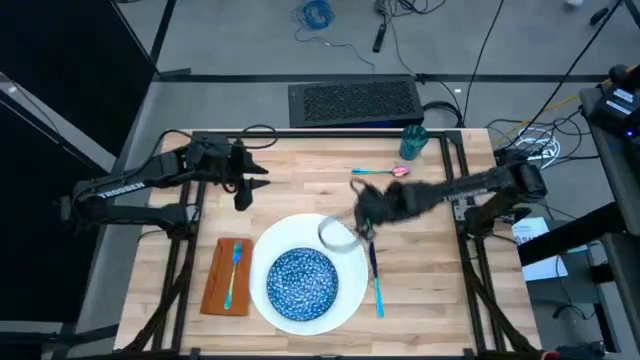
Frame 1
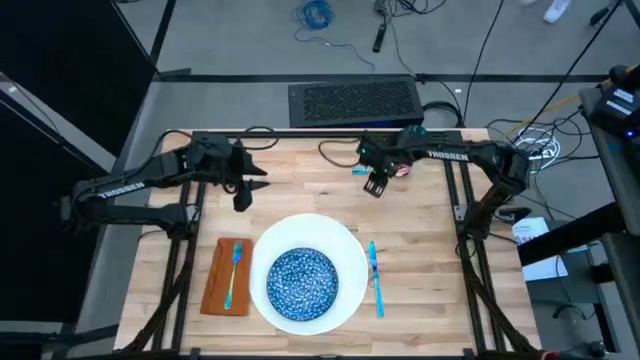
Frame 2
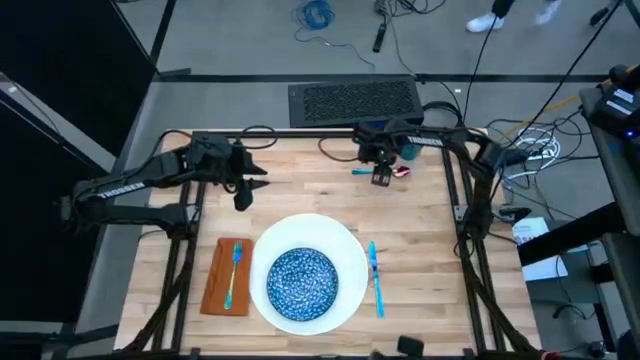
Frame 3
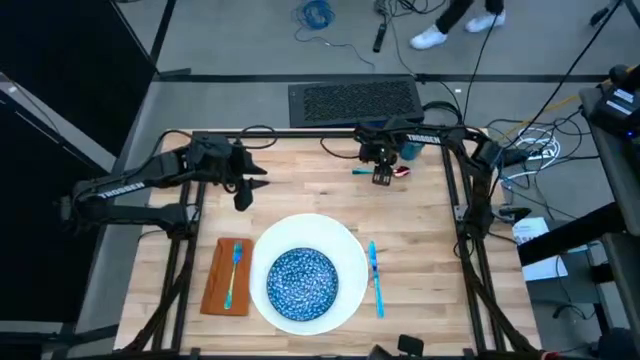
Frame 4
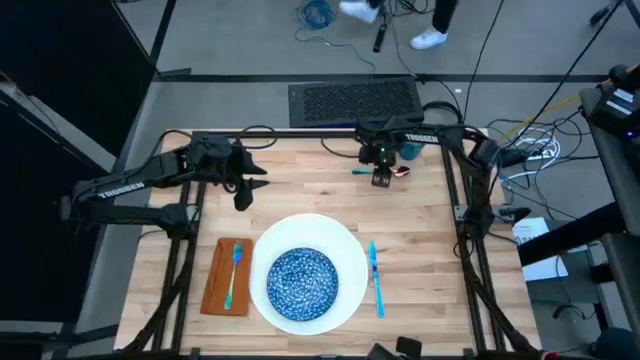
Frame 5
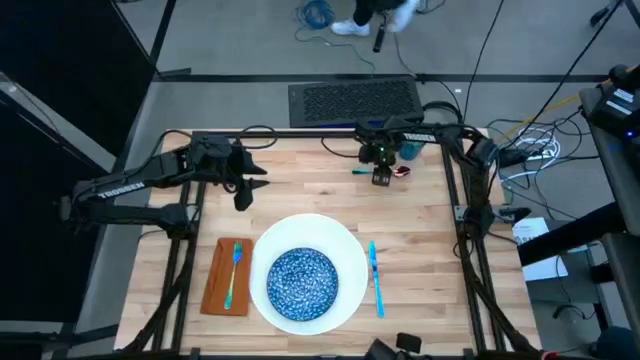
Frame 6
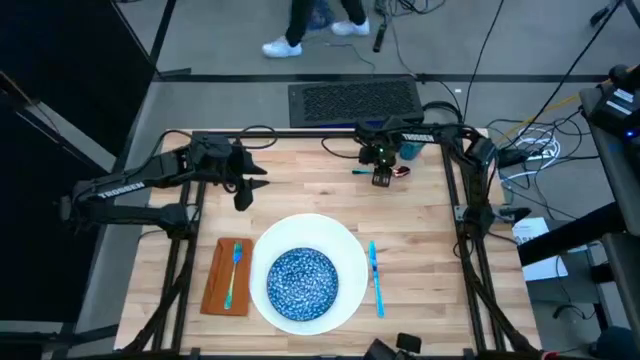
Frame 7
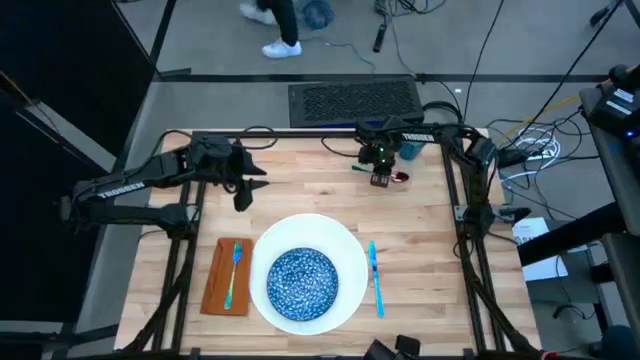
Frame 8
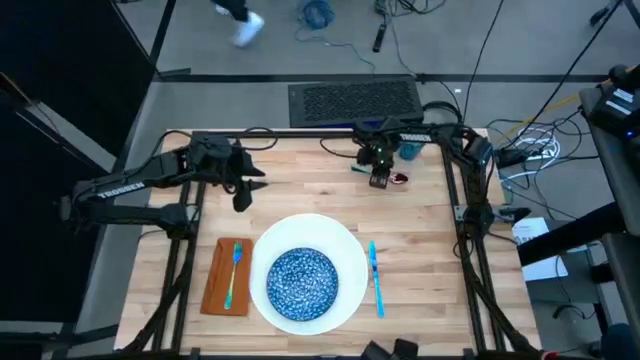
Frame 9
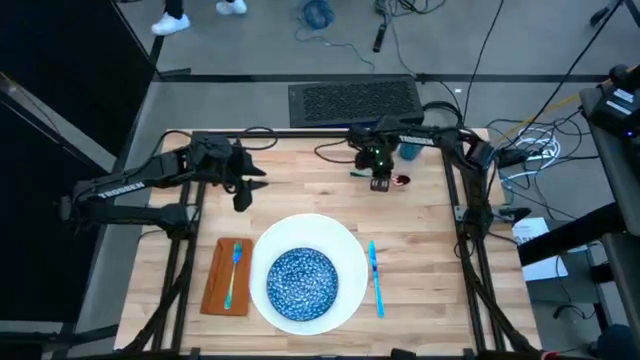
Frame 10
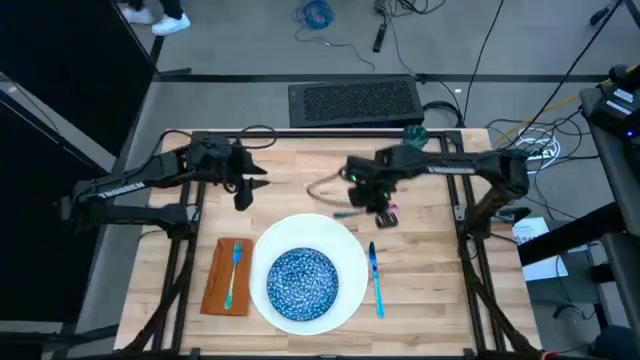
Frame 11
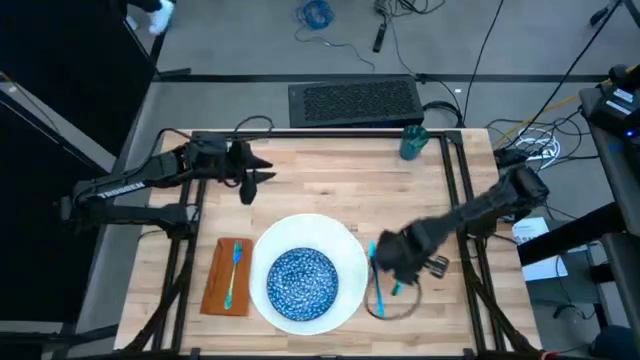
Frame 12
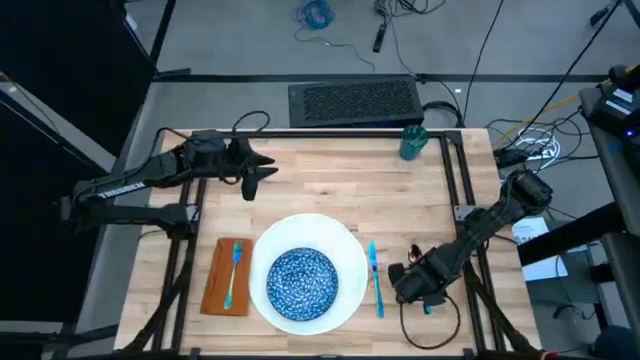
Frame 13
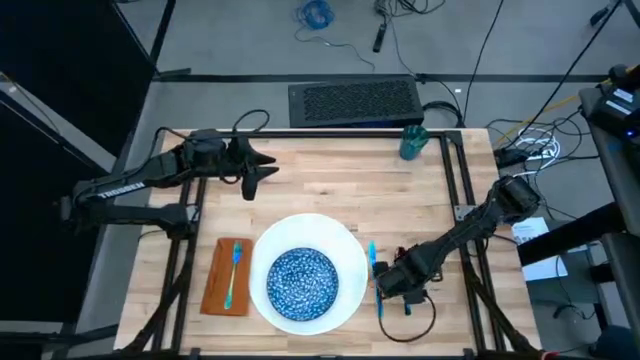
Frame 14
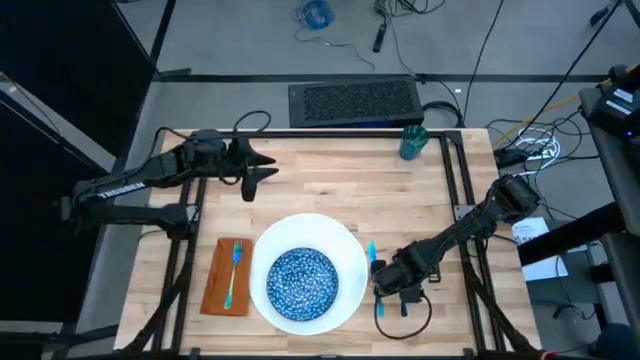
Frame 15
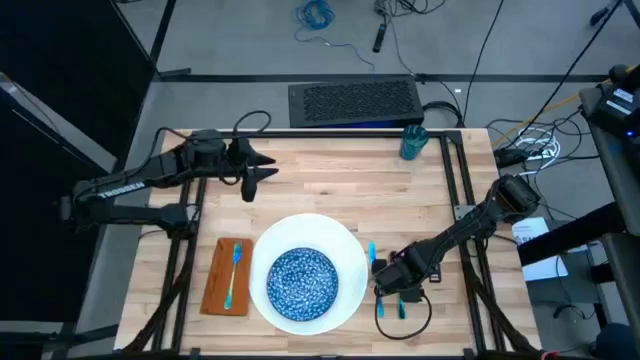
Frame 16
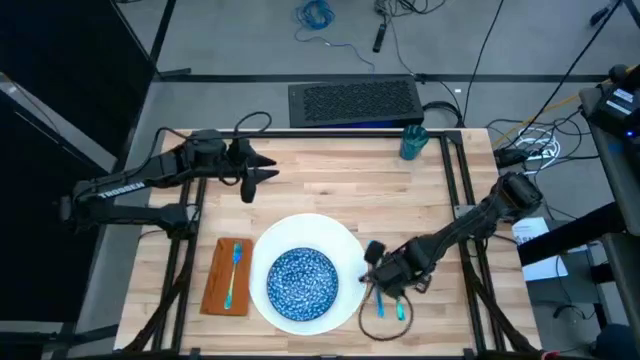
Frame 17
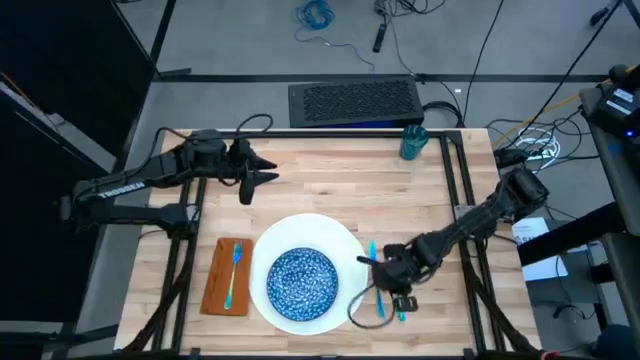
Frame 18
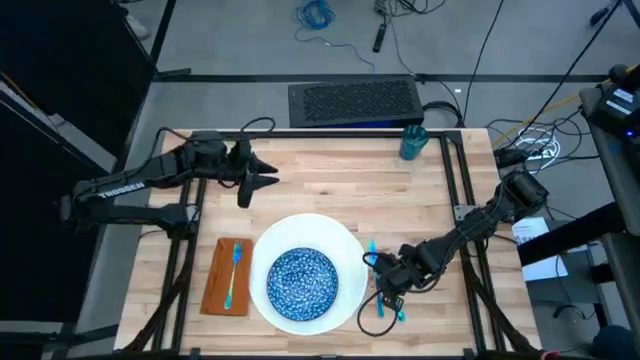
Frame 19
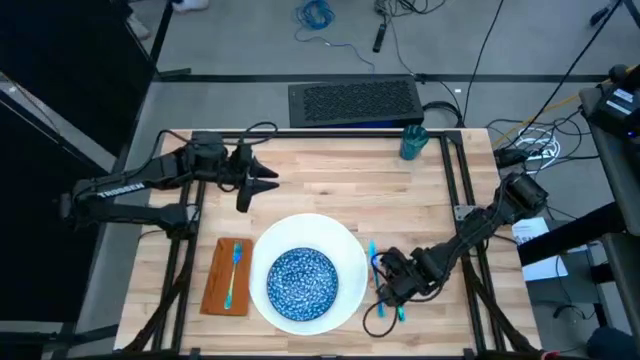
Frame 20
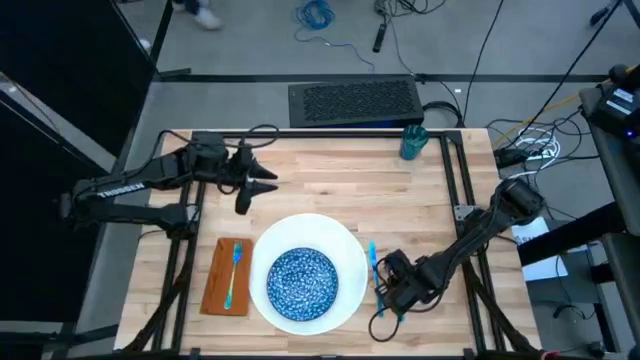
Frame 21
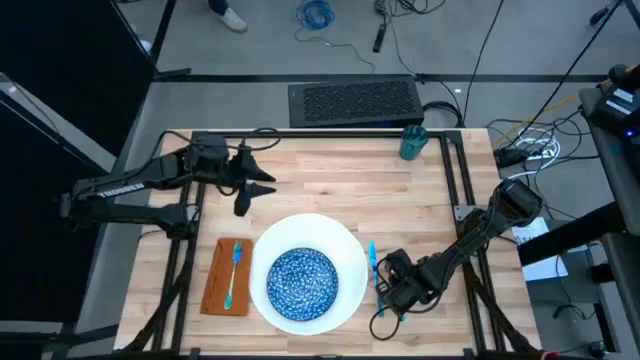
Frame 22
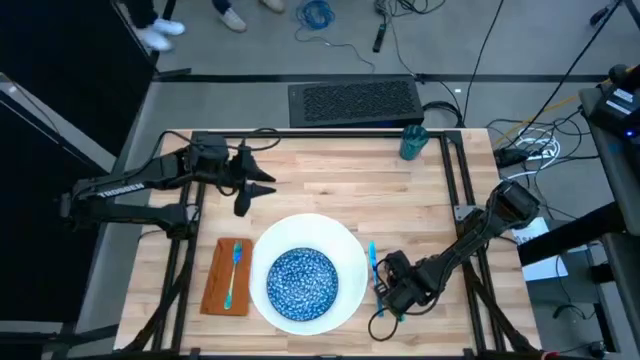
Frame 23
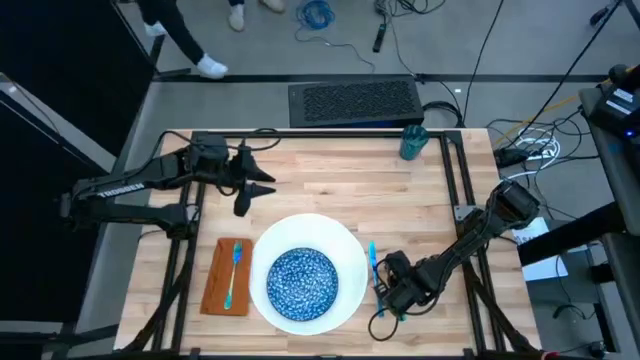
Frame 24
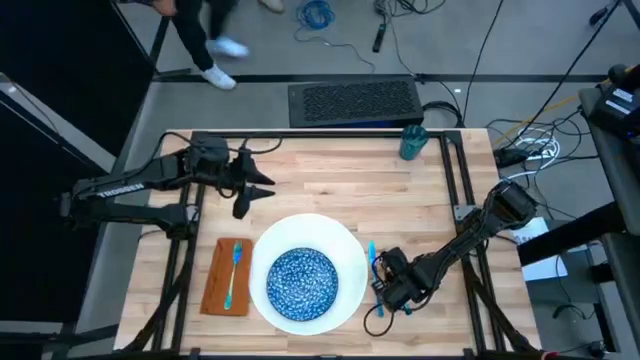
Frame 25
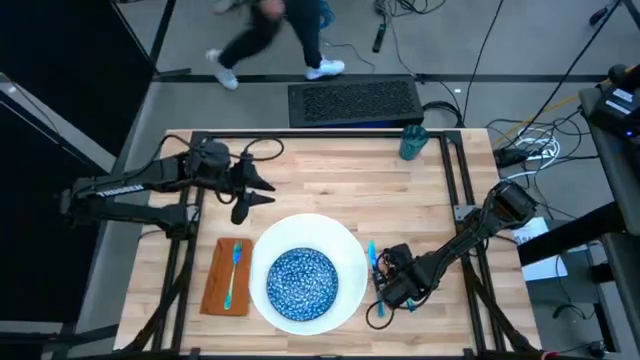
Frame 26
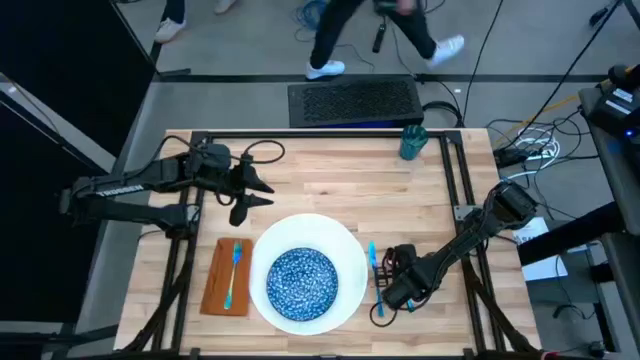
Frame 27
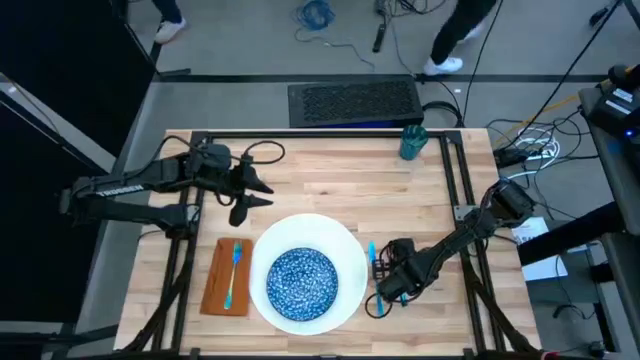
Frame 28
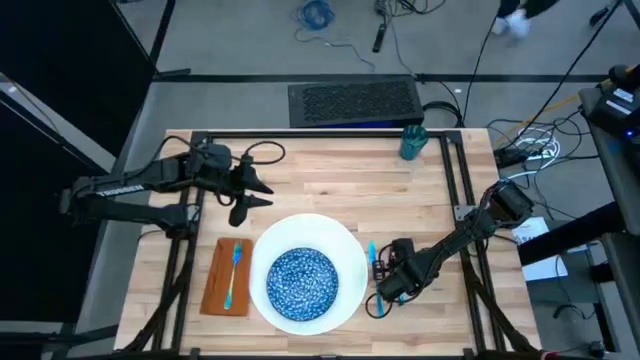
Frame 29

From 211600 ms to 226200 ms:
Task: Set table place
Put the blue spoon on the right side of the blue table knife

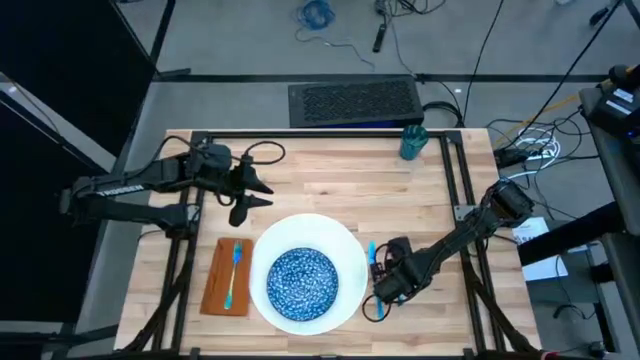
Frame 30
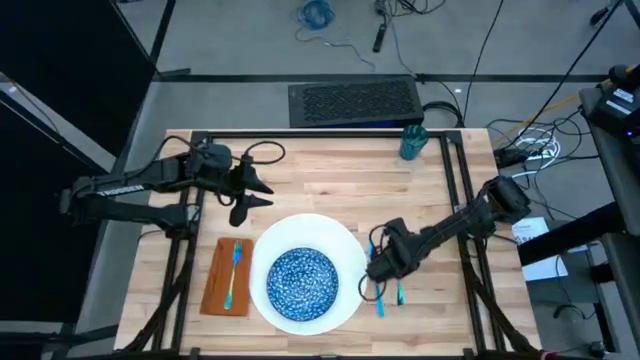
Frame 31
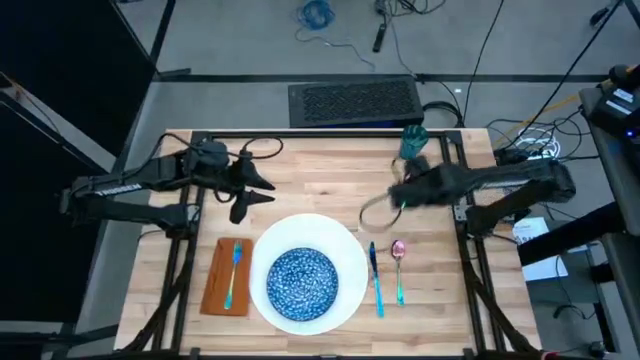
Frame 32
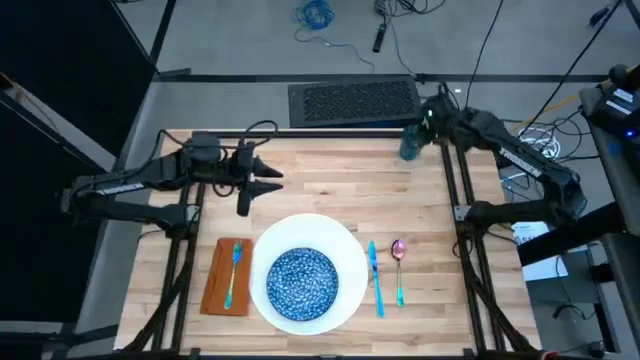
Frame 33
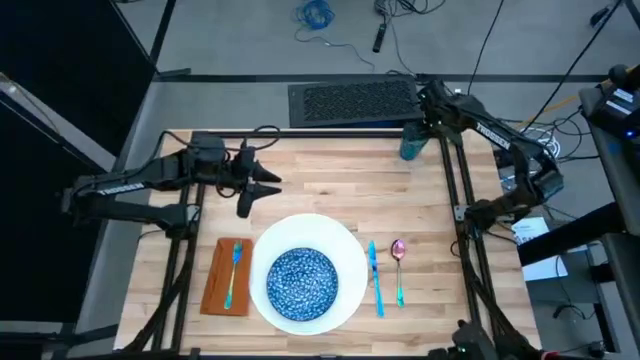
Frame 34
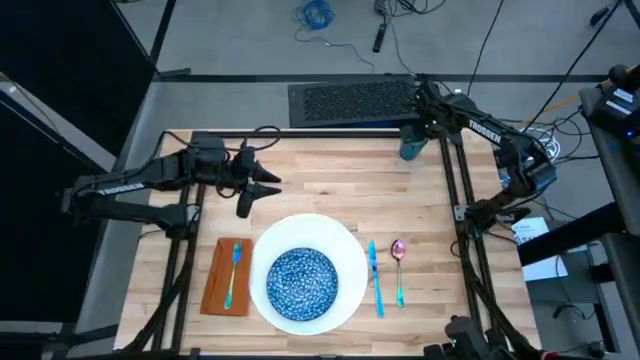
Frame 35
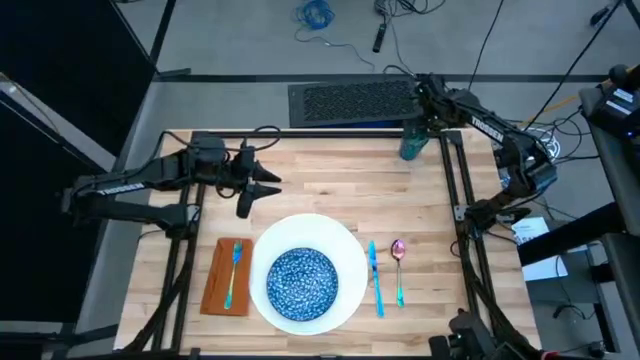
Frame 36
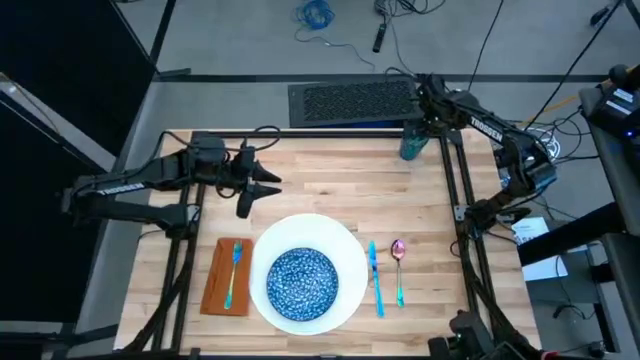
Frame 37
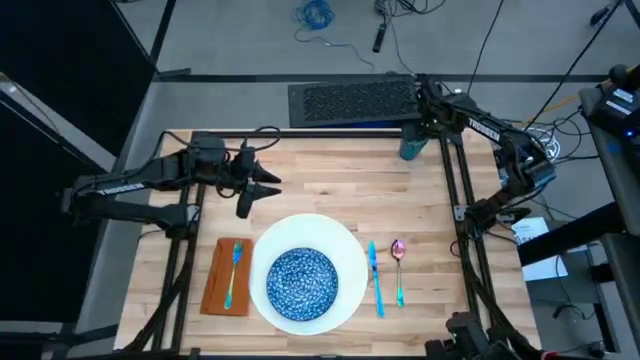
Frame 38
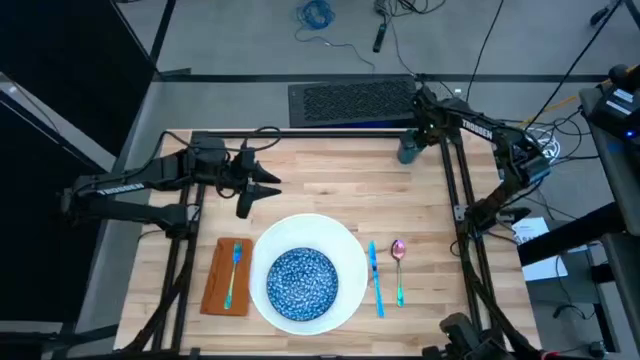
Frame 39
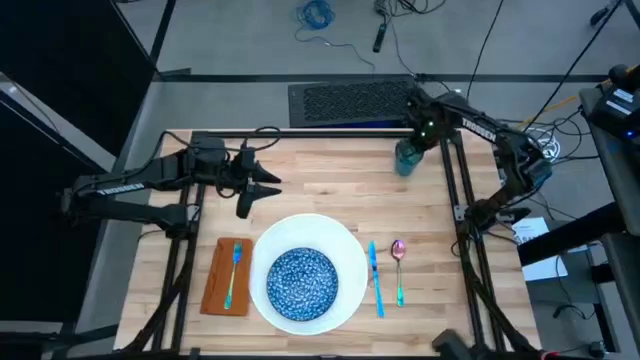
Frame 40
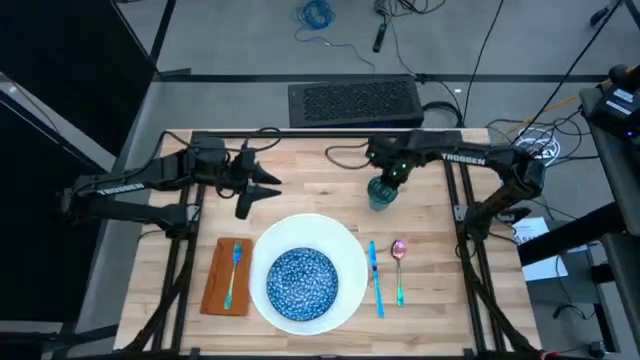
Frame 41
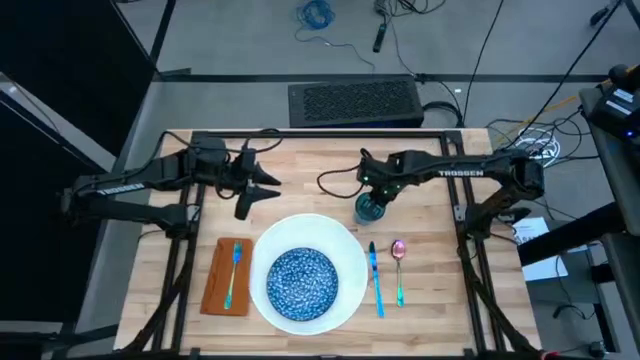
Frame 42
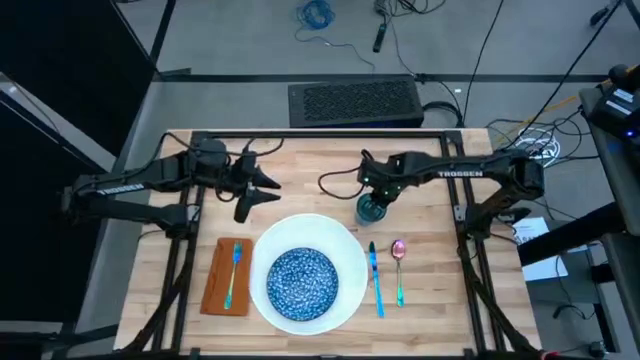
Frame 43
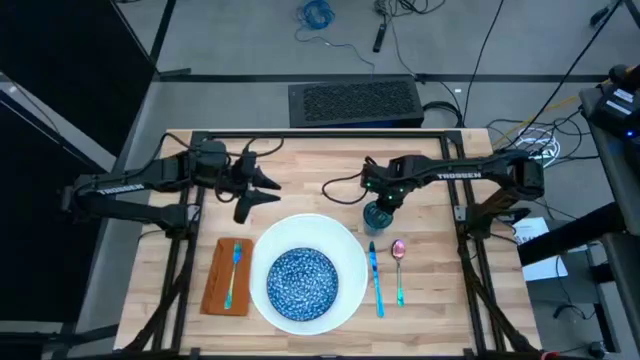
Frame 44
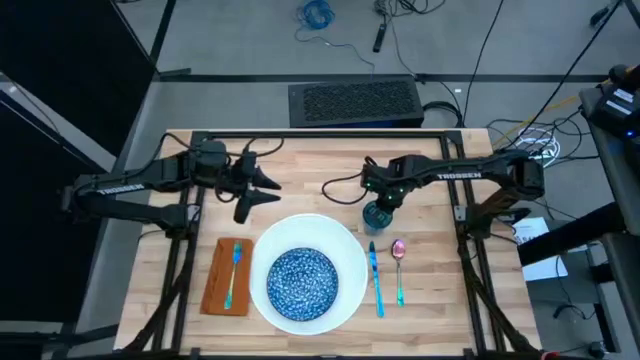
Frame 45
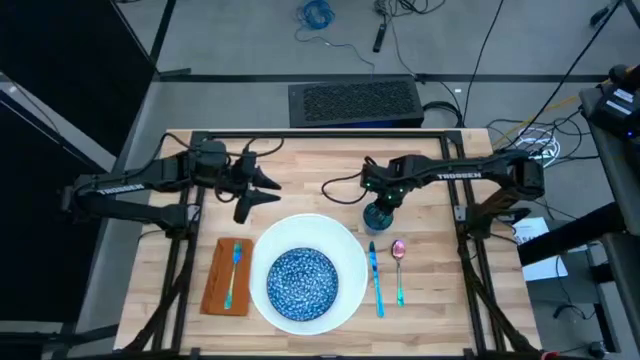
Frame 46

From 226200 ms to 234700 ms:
Put the blue cup on the top right of the white table mat
